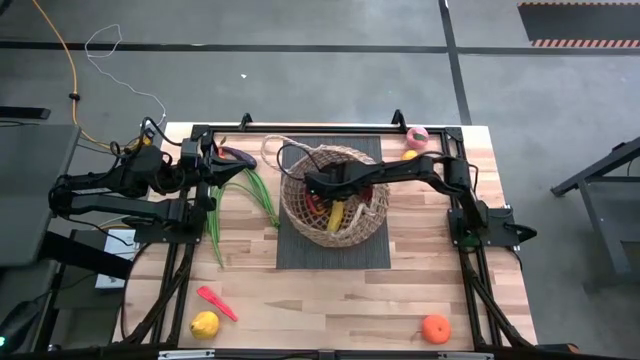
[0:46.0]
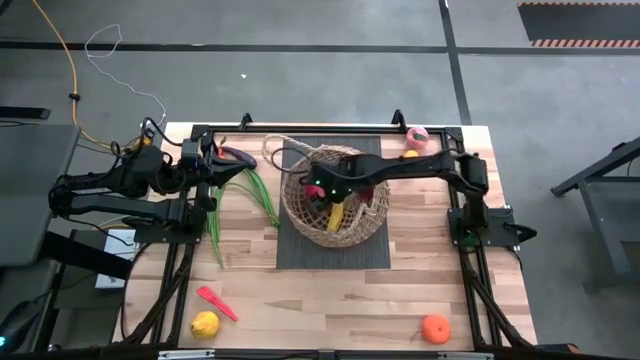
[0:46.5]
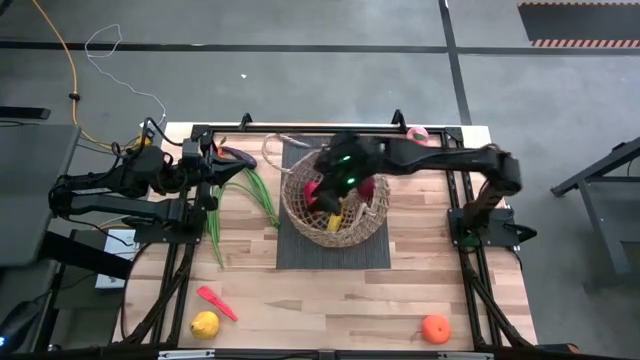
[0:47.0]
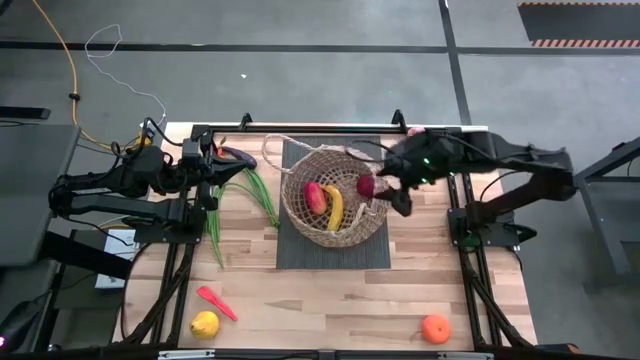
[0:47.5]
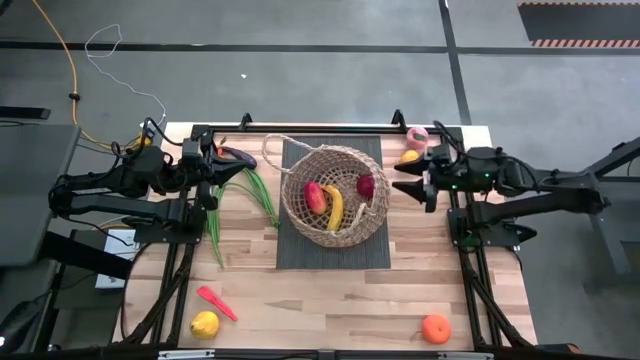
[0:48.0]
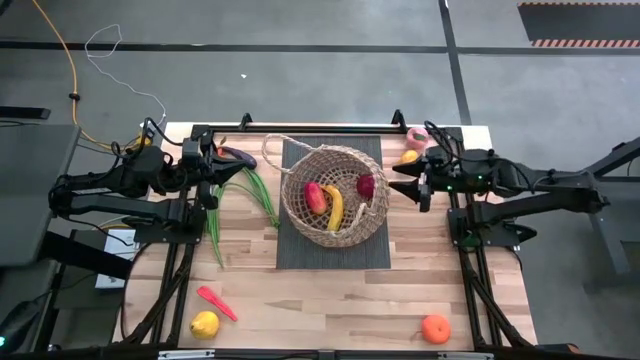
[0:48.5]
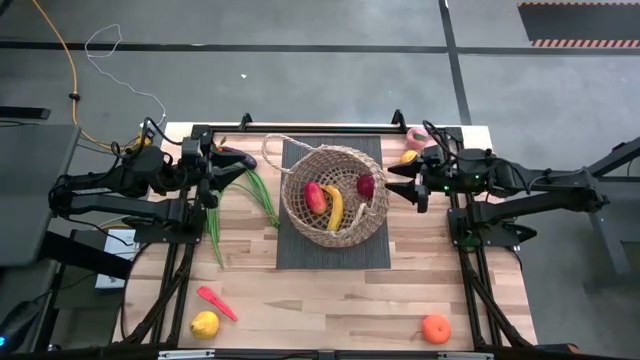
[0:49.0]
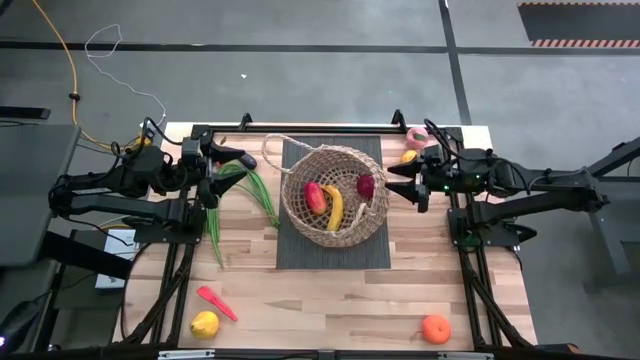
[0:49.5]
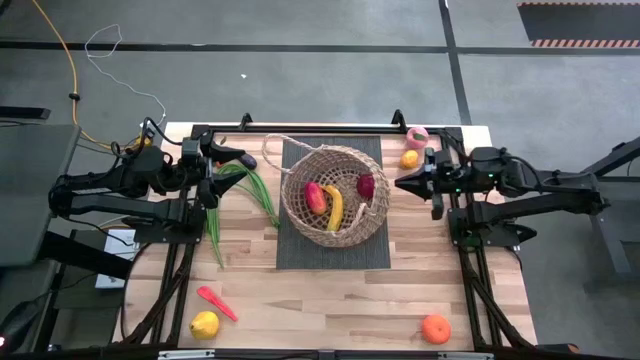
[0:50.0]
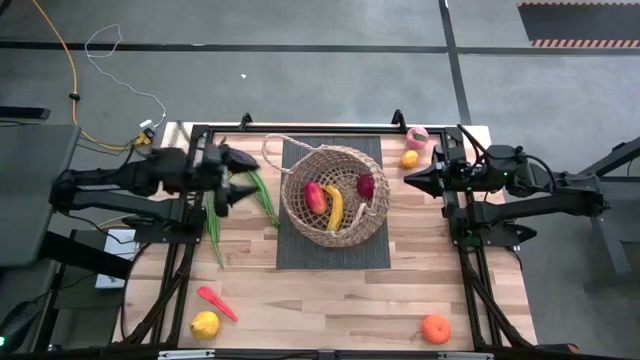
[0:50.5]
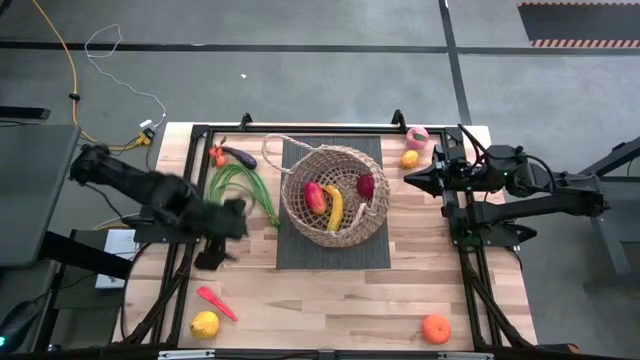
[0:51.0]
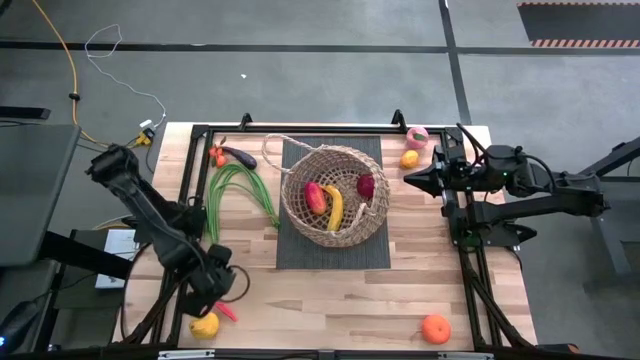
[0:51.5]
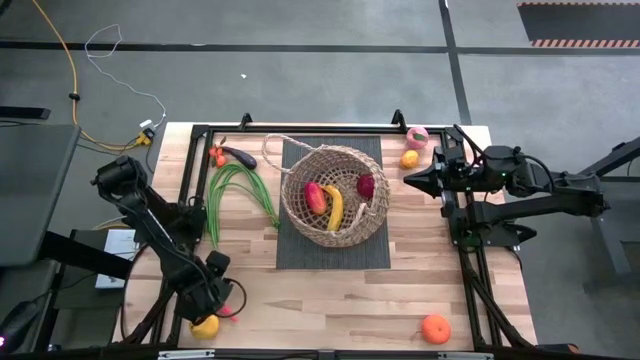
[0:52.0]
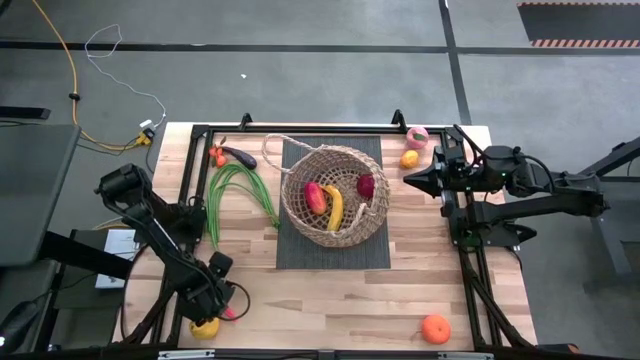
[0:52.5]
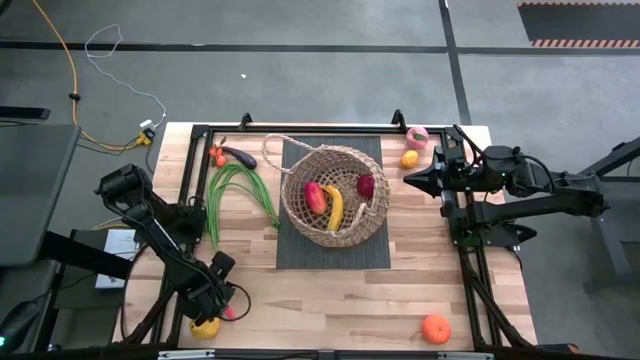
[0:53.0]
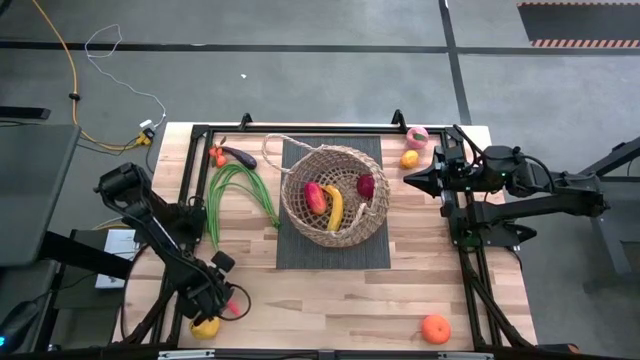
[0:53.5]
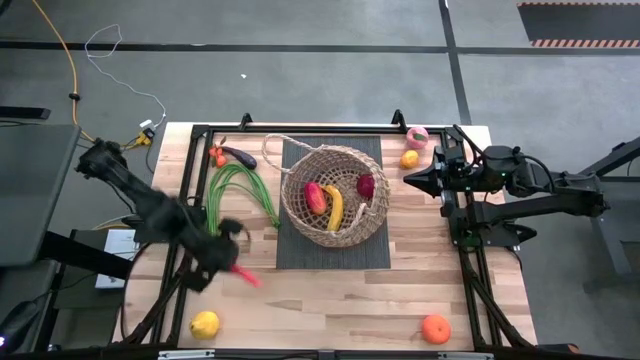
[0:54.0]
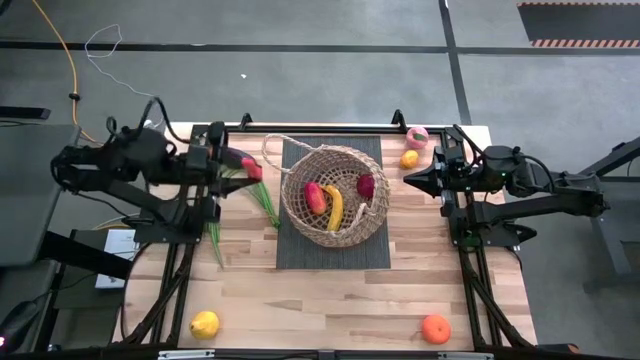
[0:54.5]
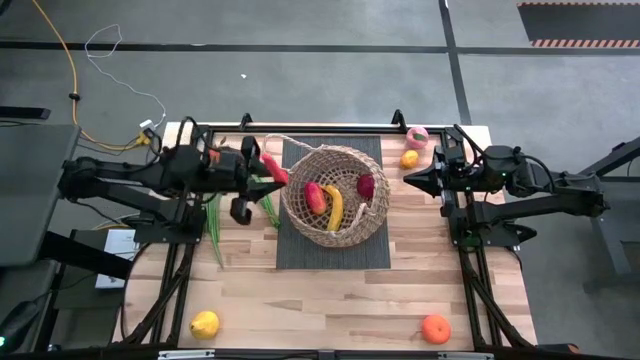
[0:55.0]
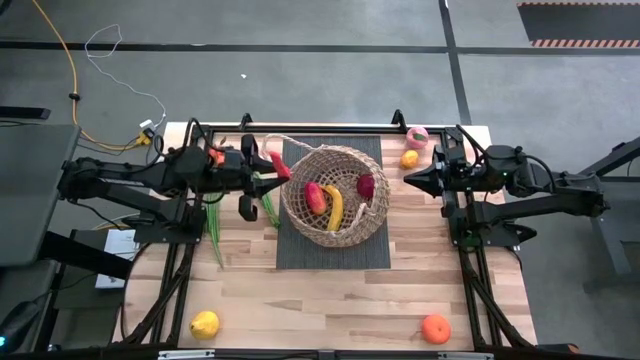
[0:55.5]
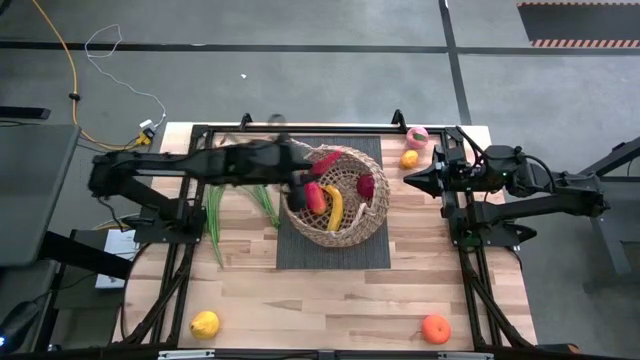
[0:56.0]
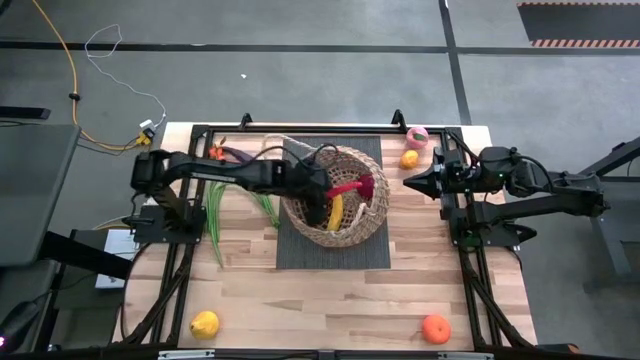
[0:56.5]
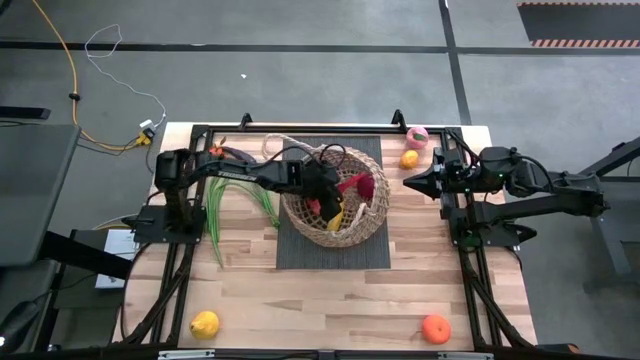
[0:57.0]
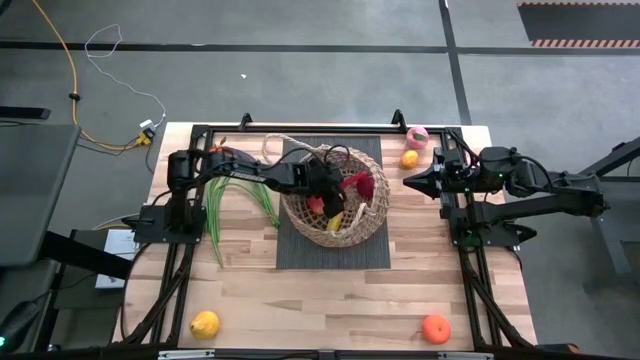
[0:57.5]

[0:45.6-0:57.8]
Task: Build produce basket
Put the carrot into the woven basket

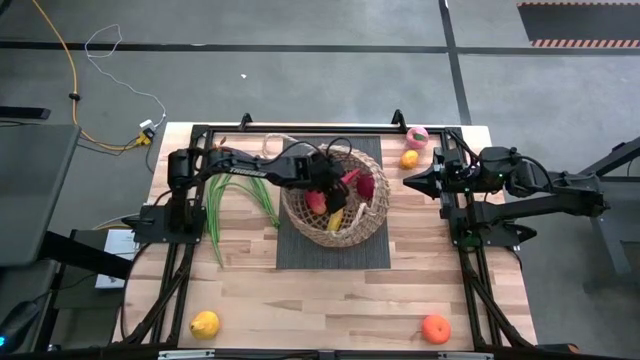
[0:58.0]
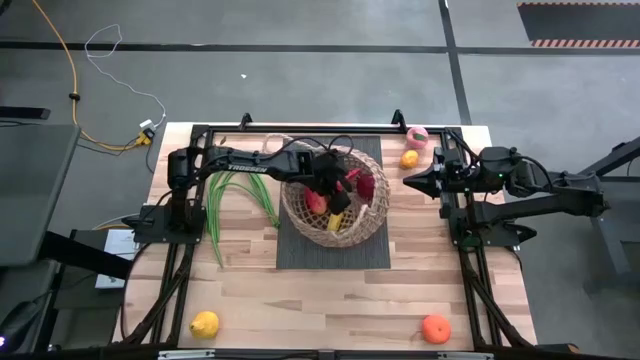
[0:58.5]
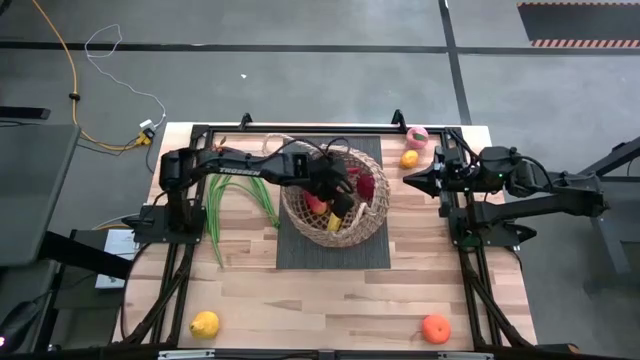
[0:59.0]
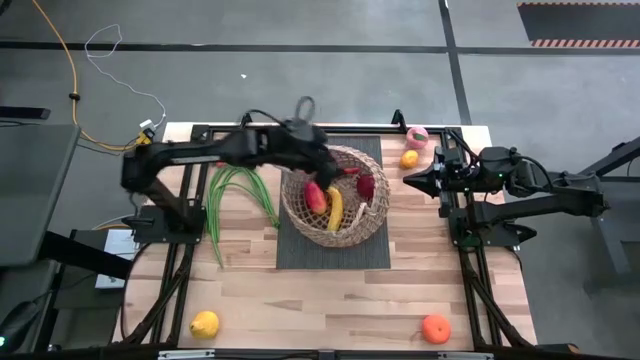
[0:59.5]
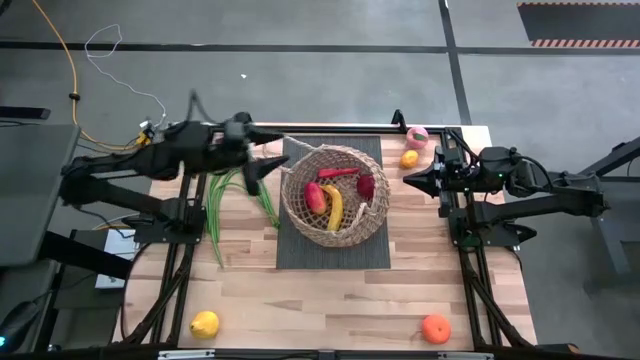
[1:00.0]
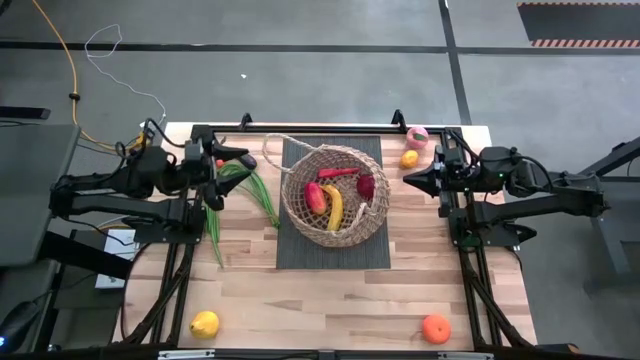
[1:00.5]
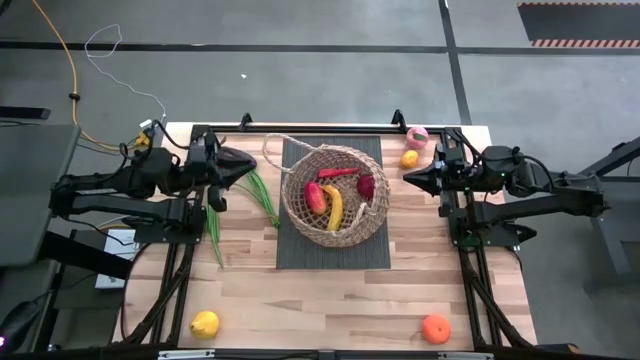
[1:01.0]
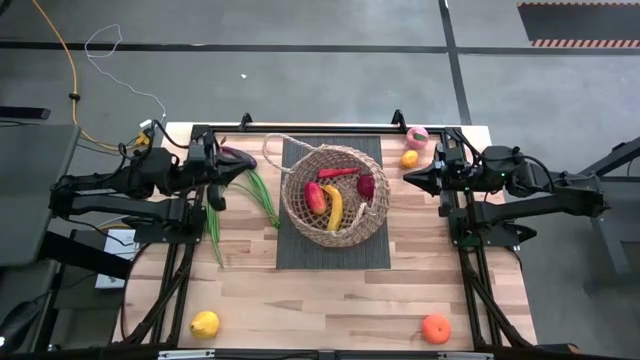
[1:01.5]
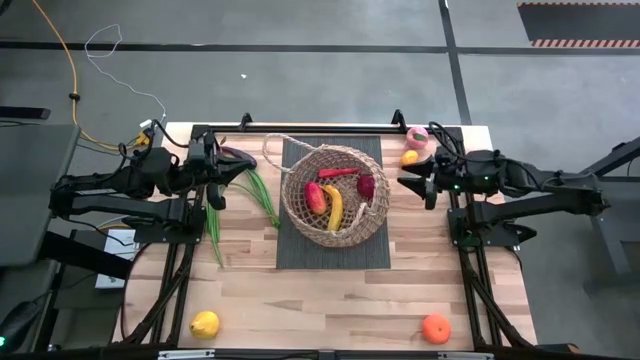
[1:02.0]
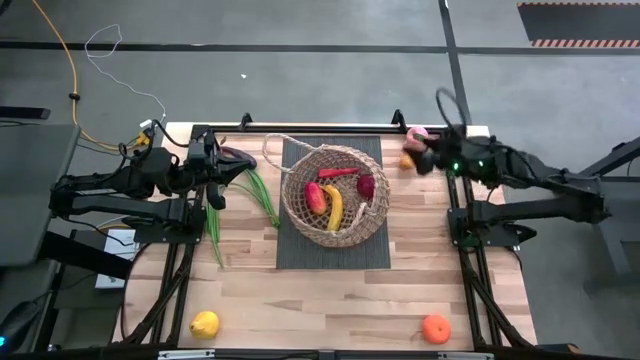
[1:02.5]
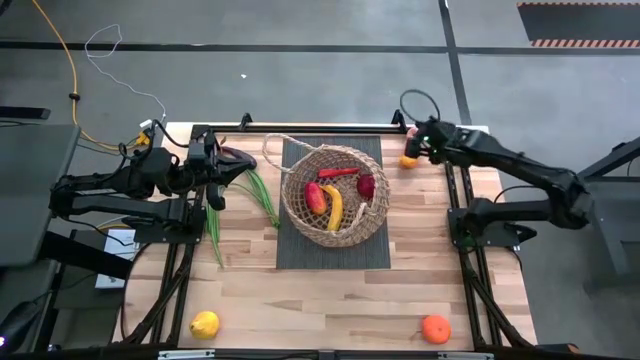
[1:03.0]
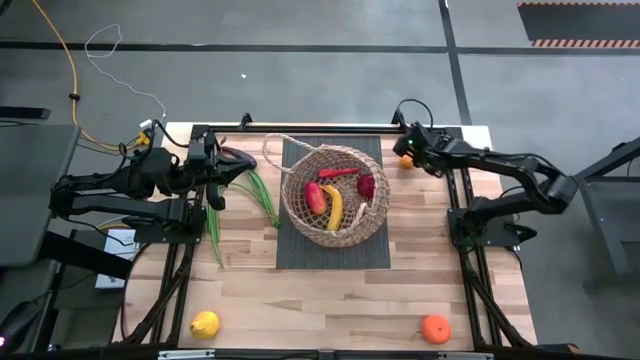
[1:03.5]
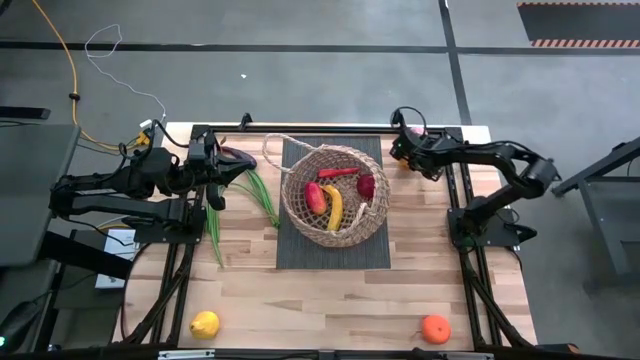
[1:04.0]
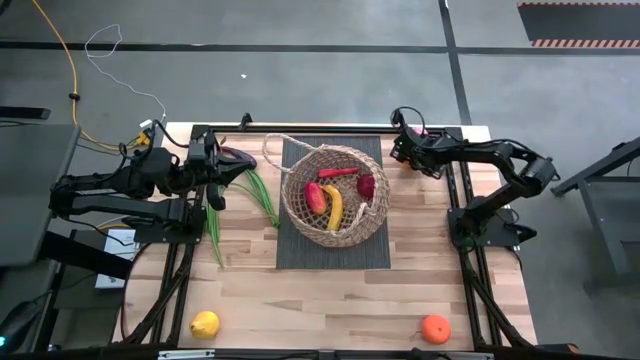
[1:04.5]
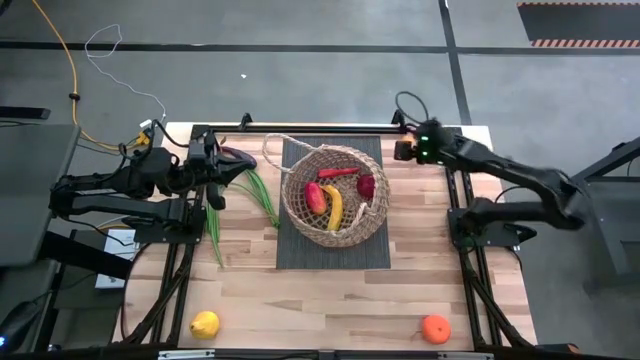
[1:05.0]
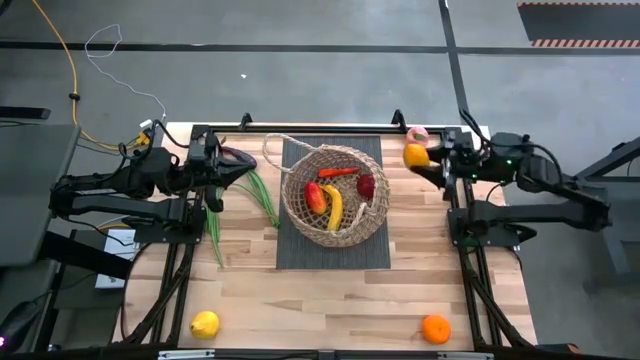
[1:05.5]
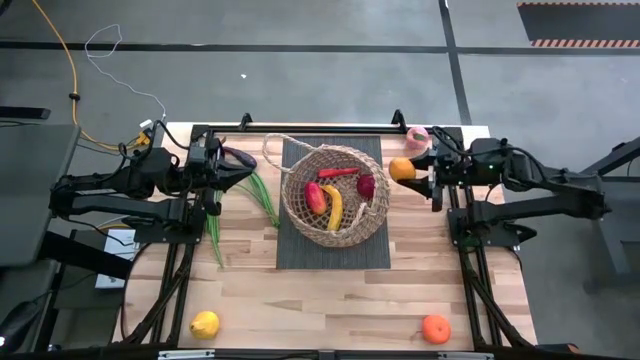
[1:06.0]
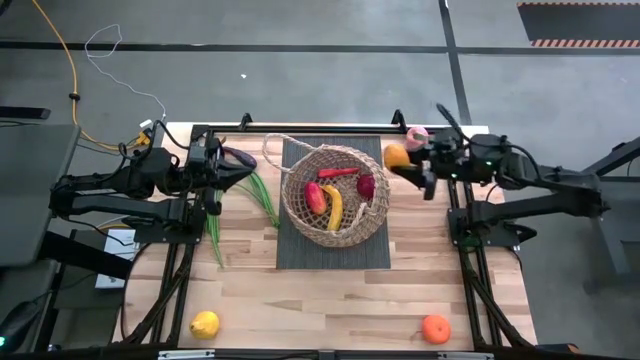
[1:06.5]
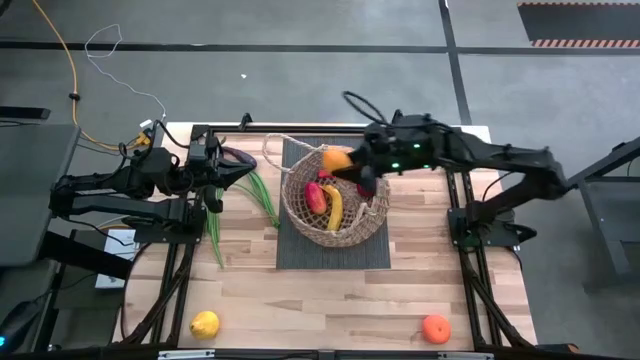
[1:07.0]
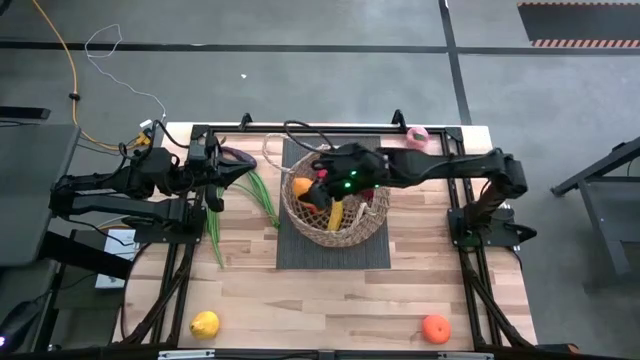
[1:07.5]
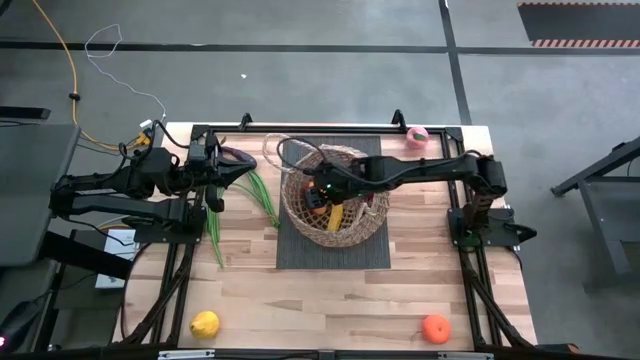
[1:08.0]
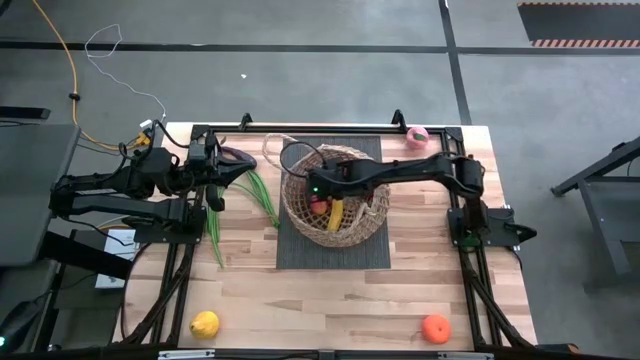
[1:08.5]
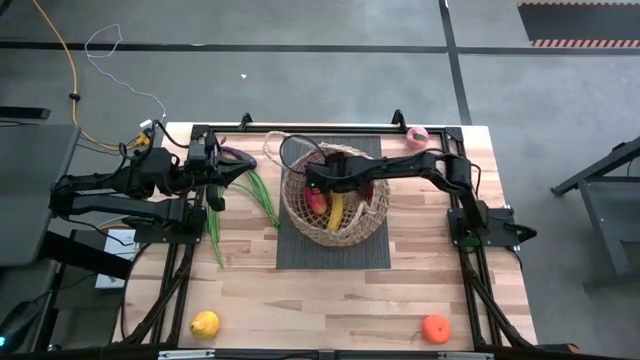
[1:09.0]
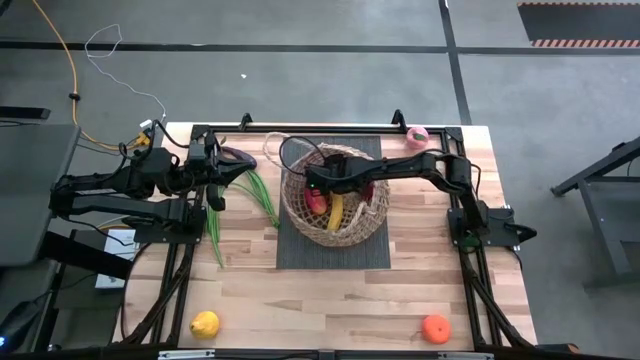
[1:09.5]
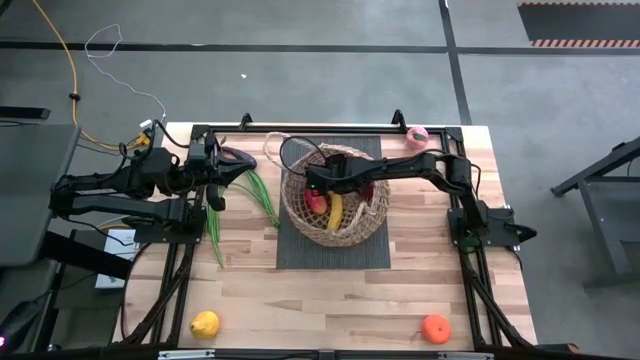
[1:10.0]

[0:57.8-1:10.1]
Put the lemon into the woven basket
